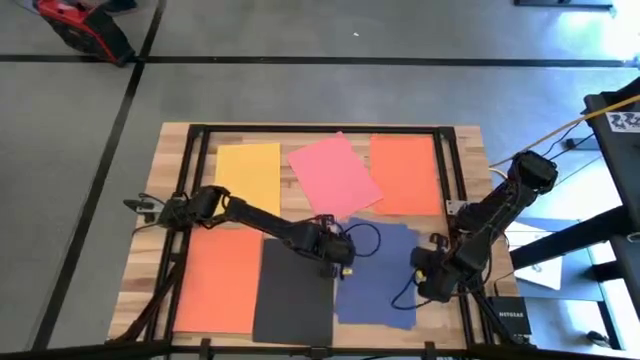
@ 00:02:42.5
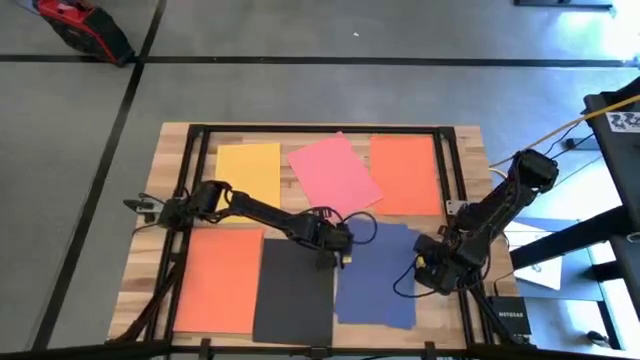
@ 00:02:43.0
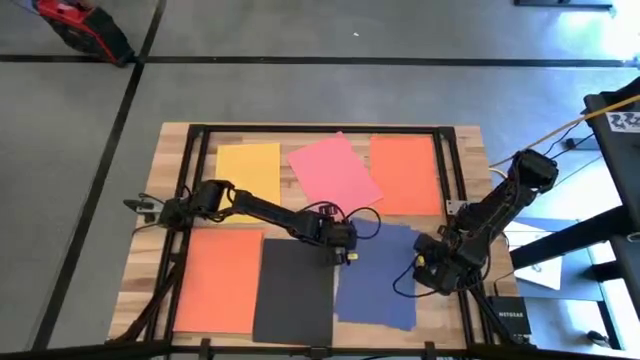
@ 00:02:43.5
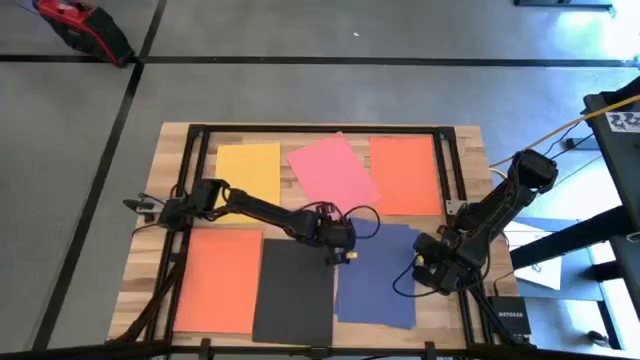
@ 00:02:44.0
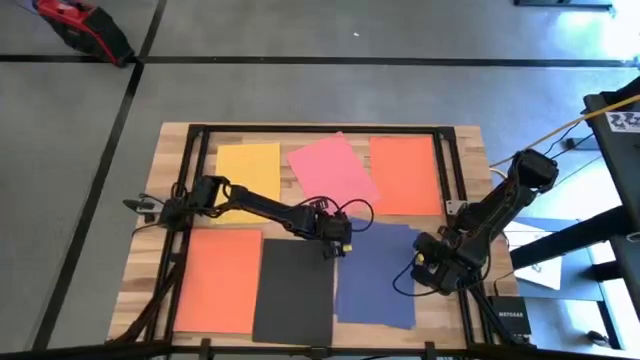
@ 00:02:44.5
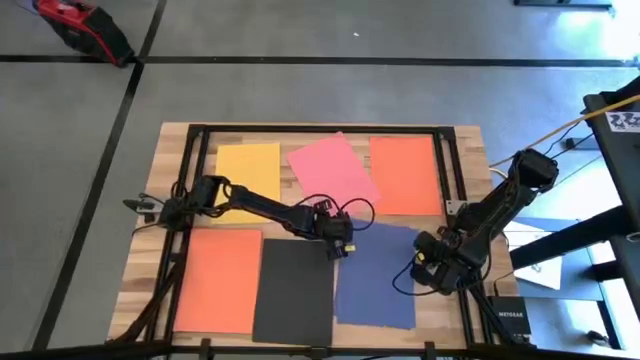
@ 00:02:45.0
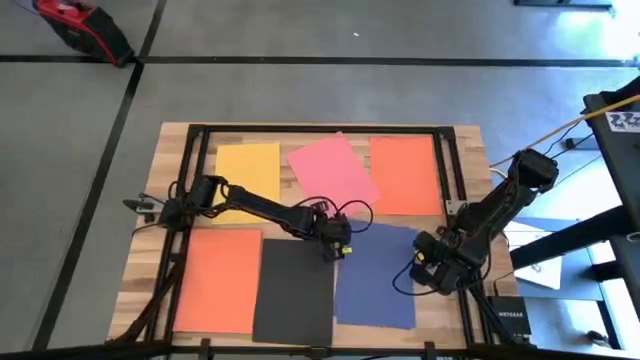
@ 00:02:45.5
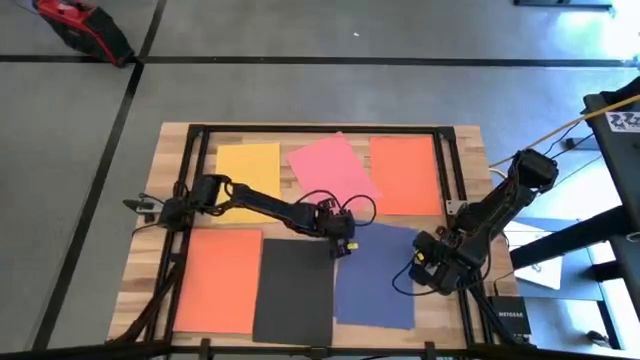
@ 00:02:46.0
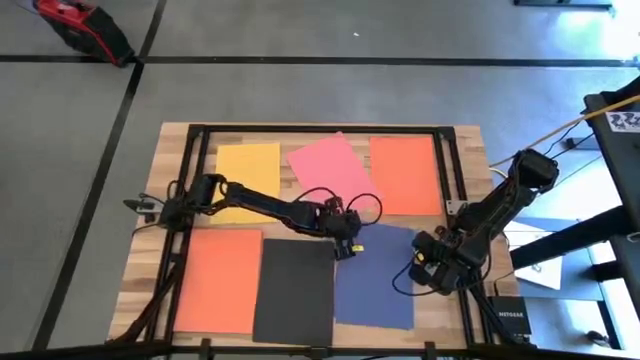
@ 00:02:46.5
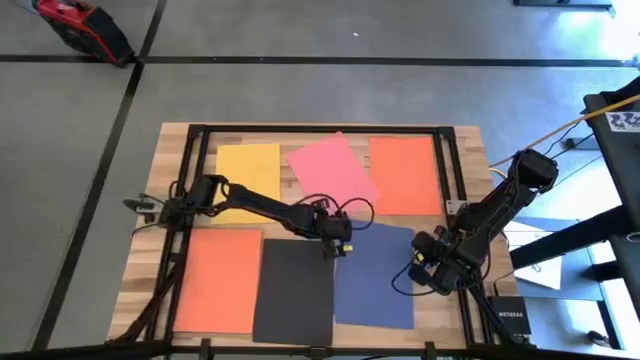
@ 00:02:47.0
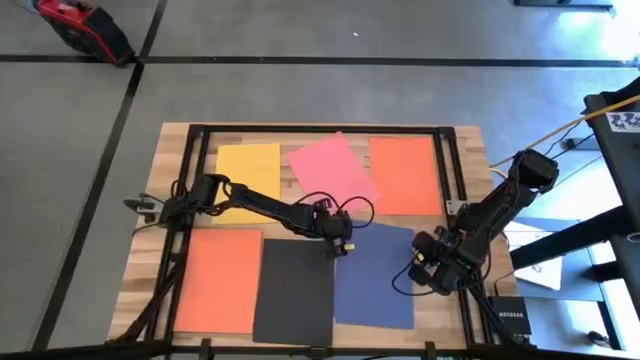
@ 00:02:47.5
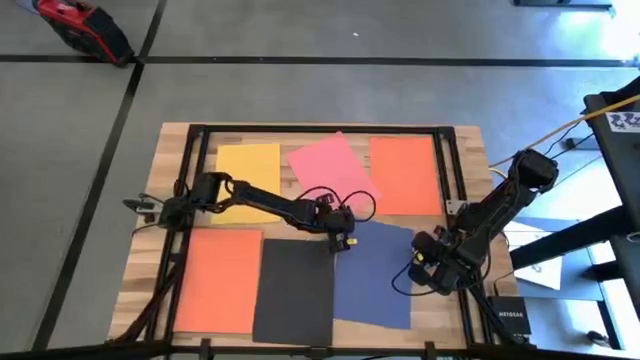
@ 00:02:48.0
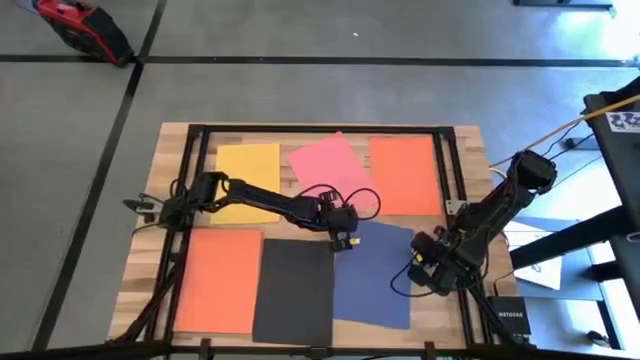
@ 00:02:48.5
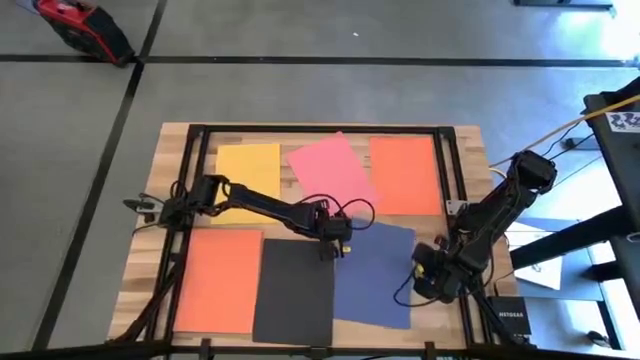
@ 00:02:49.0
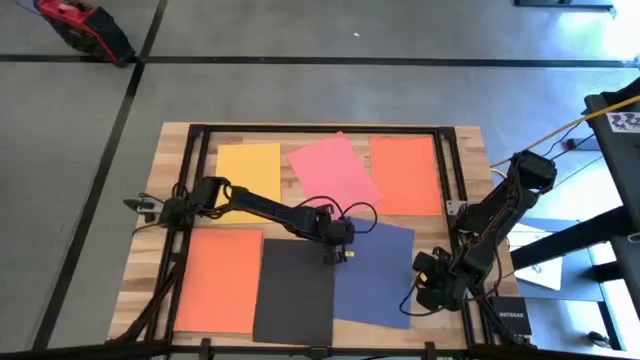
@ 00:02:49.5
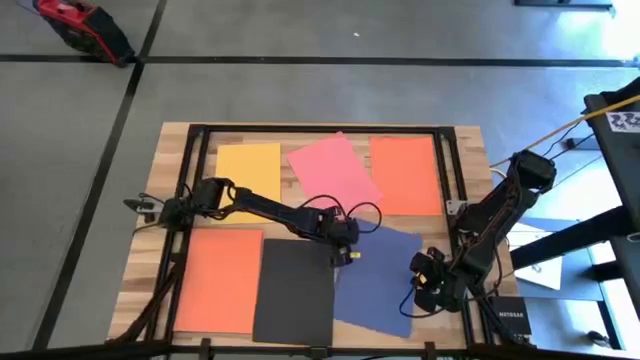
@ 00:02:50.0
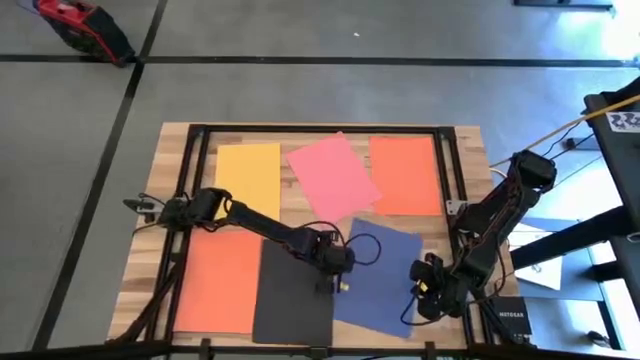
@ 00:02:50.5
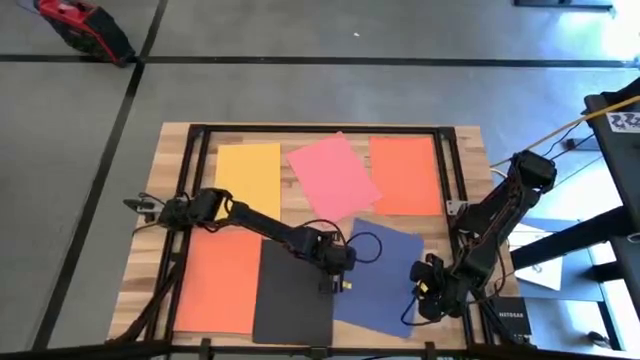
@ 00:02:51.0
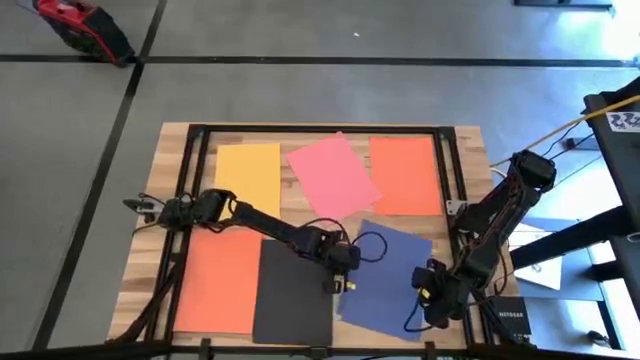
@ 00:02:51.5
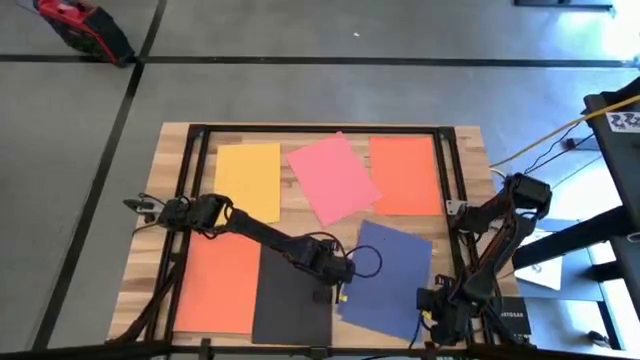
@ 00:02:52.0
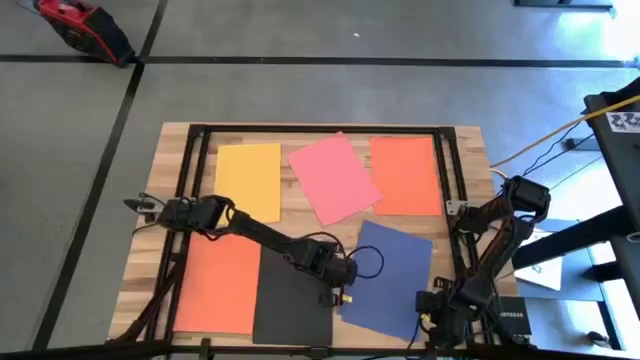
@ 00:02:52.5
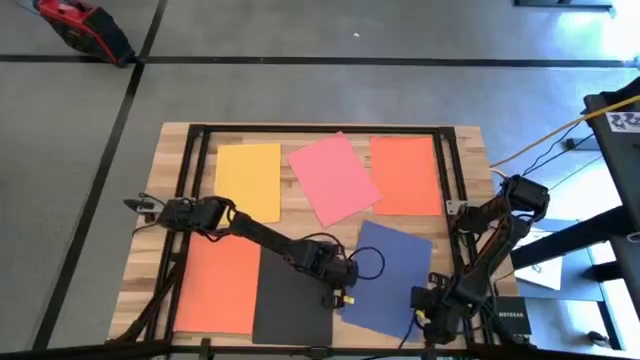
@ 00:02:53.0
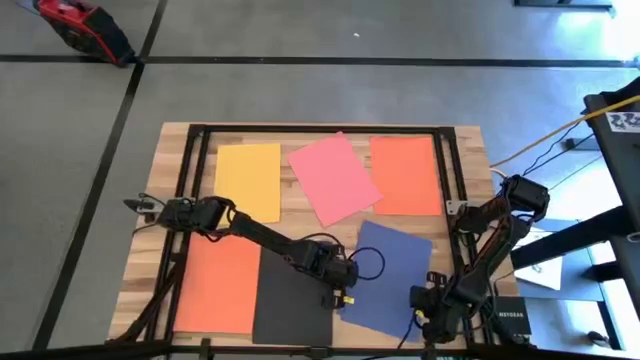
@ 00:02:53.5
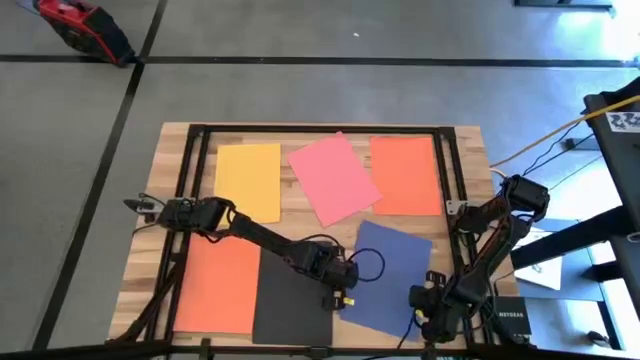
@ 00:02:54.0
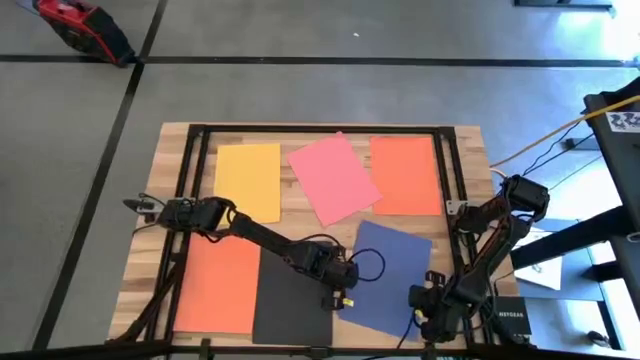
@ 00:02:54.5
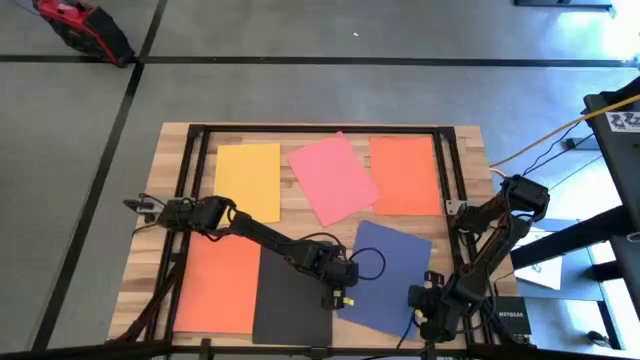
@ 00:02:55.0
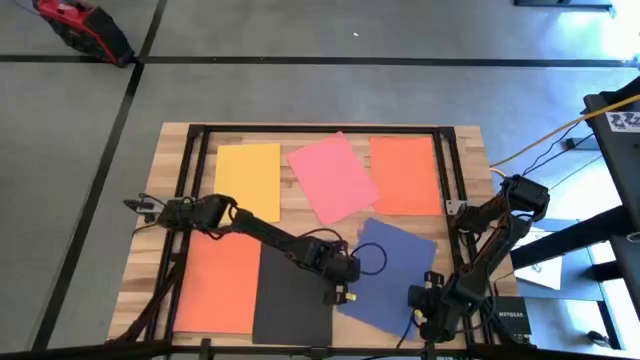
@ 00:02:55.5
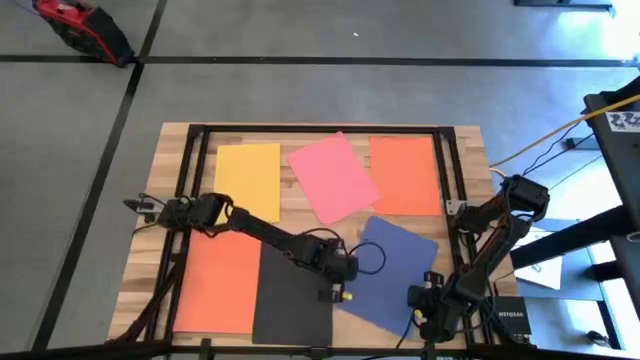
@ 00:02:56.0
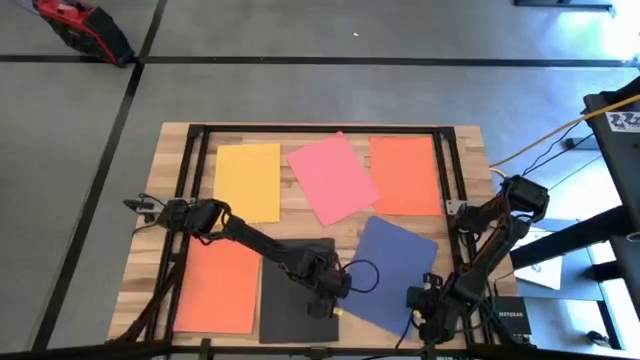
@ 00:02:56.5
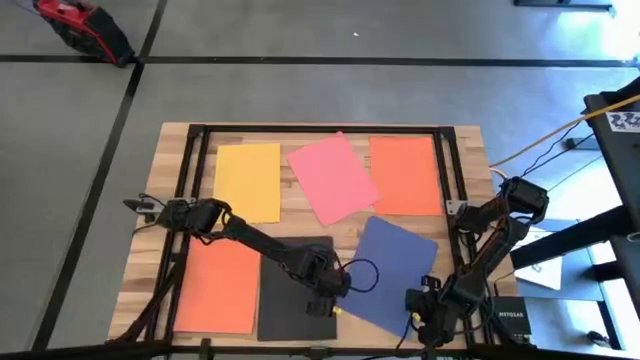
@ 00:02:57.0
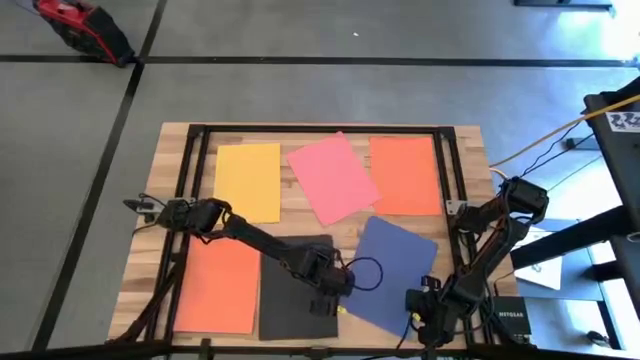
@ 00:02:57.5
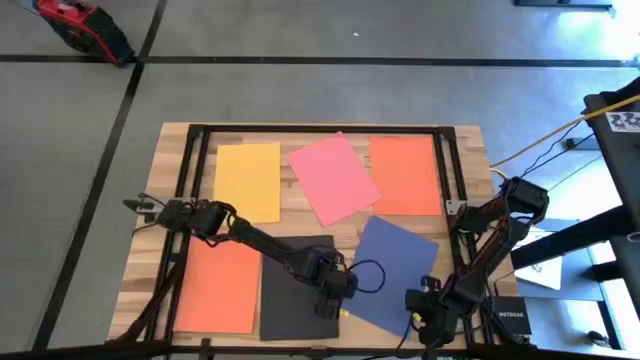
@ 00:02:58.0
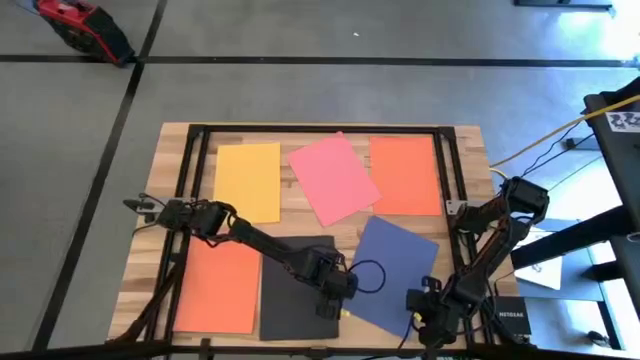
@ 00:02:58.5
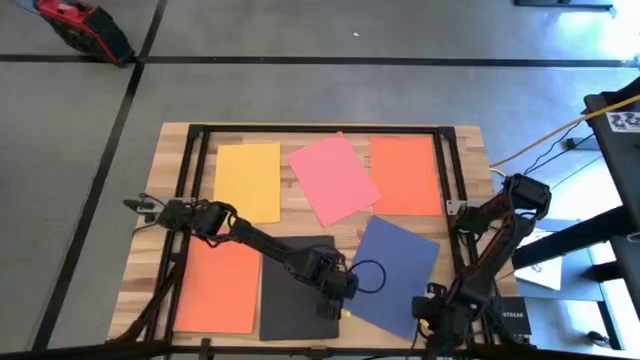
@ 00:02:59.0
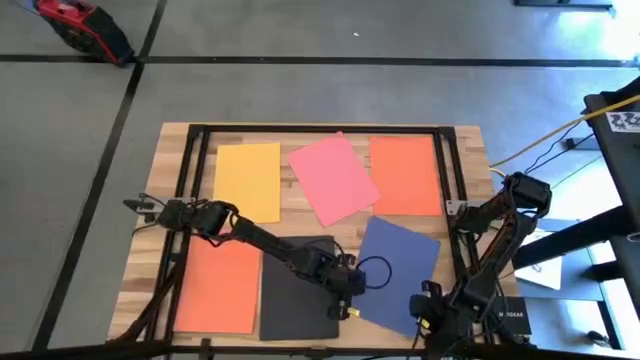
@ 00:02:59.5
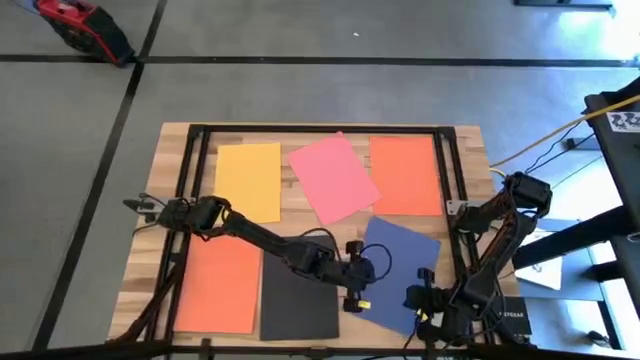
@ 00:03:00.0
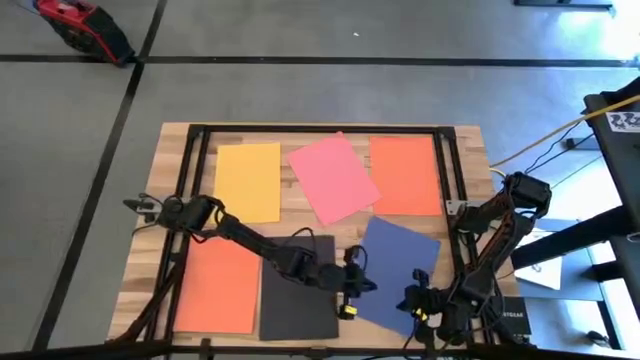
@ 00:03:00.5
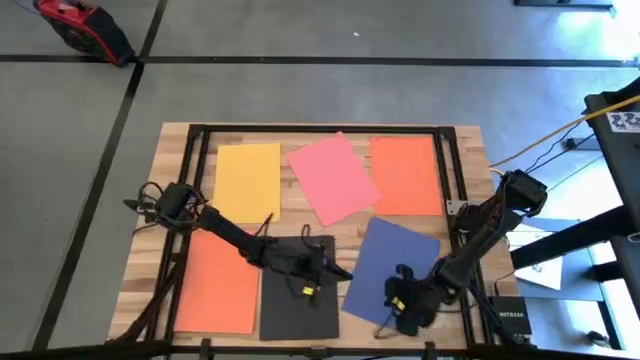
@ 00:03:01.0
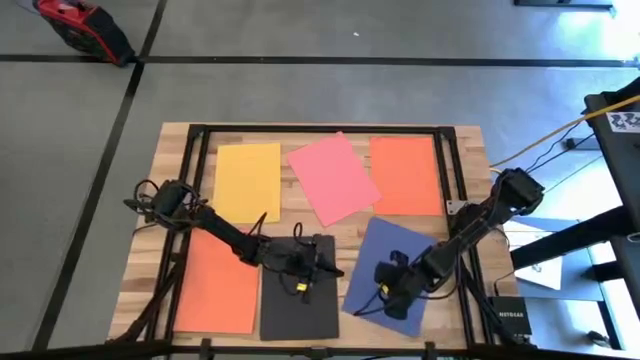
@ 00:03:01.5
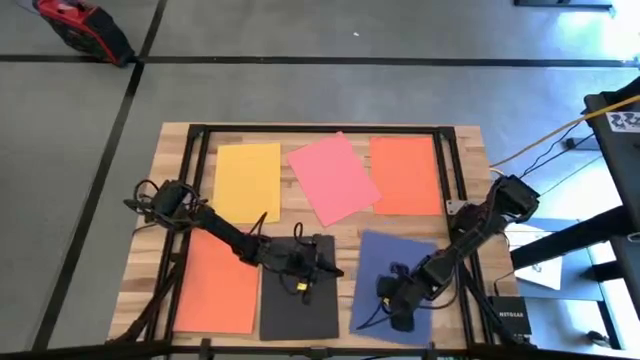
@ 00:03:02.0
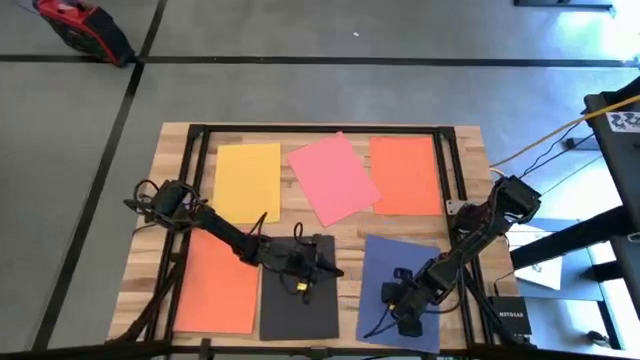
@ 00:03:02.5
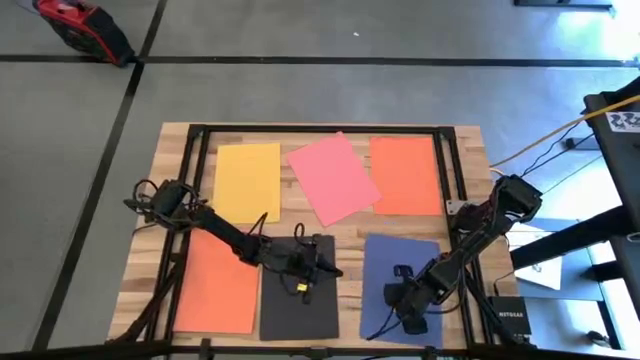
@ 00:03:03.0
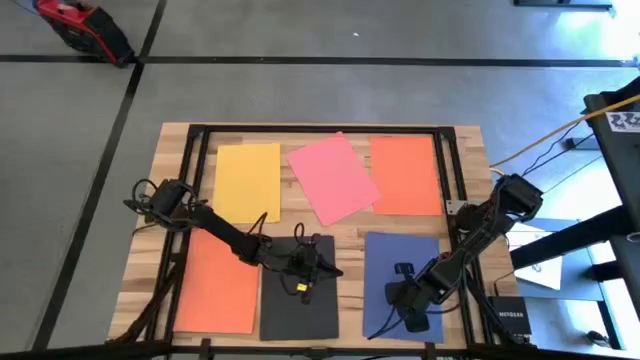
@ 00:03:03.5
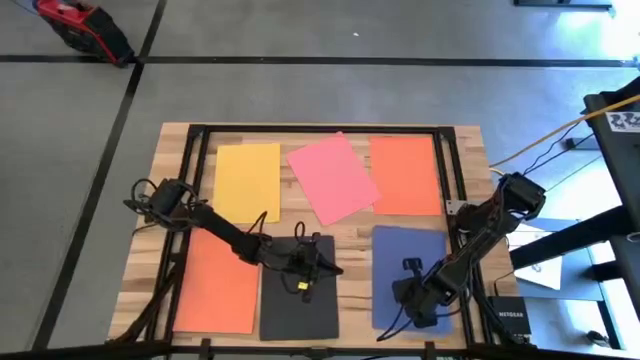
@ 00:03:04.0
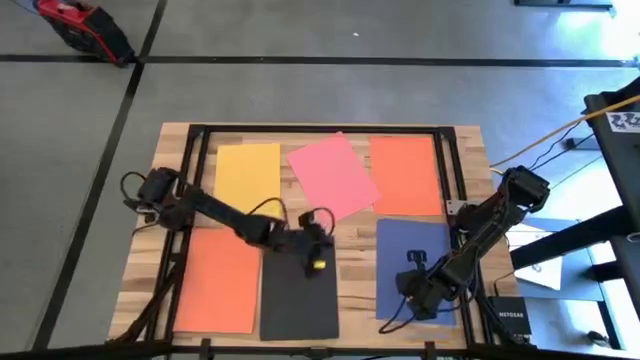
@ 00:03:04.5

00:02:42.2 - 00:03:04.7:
Task: Organize paper
Stack the blue paper on top of the blue paper on the table
